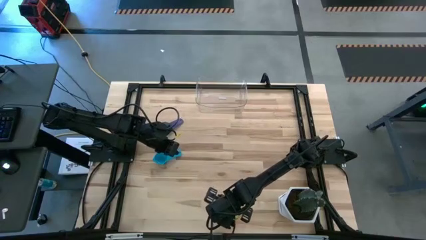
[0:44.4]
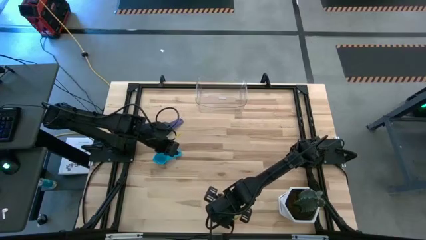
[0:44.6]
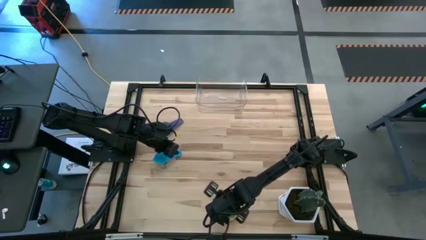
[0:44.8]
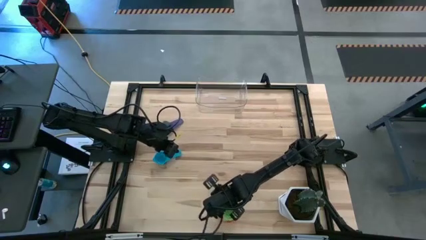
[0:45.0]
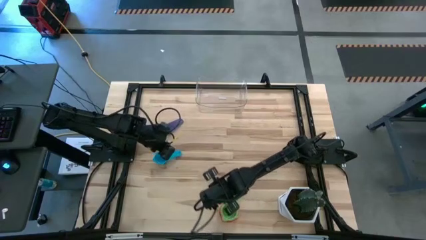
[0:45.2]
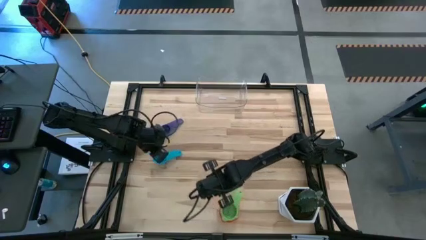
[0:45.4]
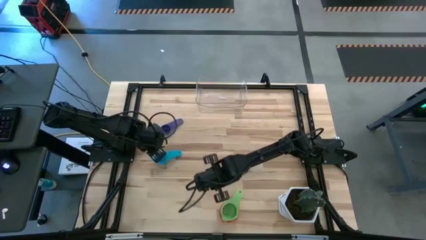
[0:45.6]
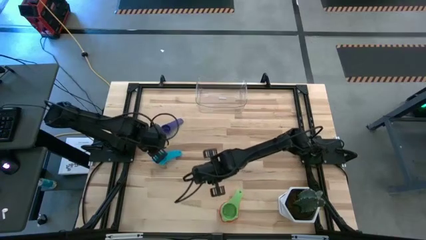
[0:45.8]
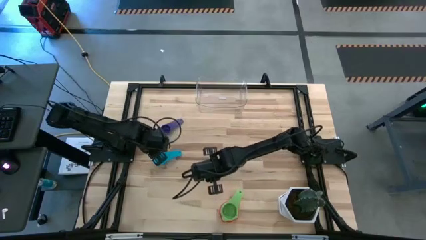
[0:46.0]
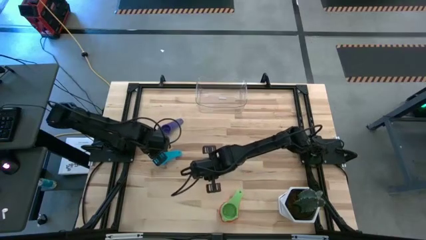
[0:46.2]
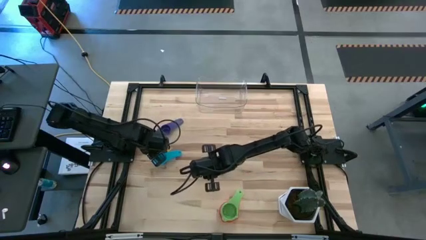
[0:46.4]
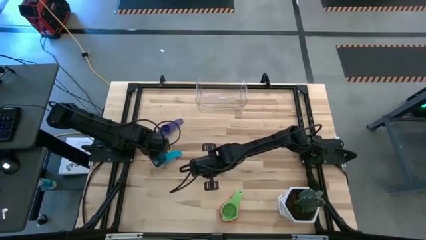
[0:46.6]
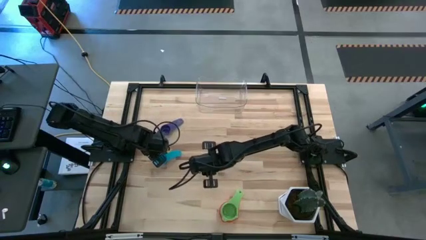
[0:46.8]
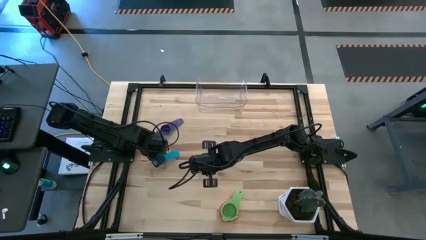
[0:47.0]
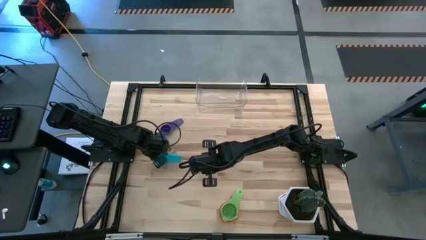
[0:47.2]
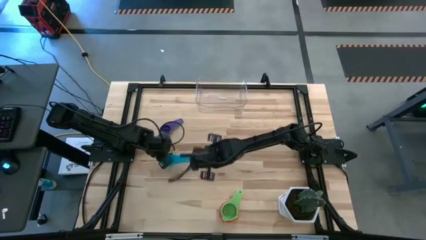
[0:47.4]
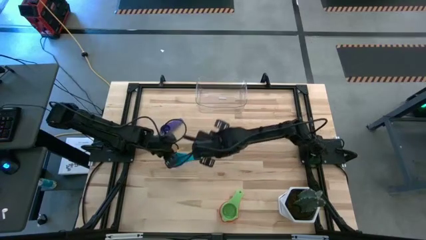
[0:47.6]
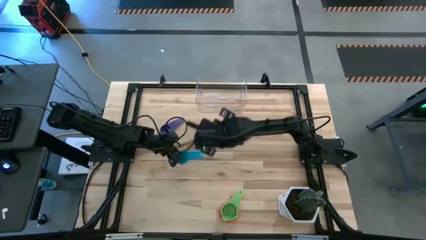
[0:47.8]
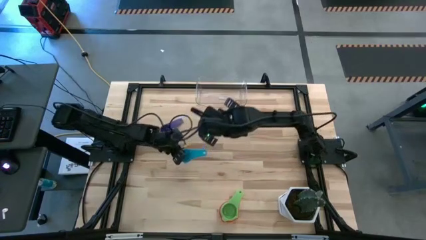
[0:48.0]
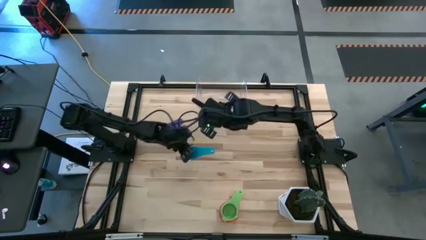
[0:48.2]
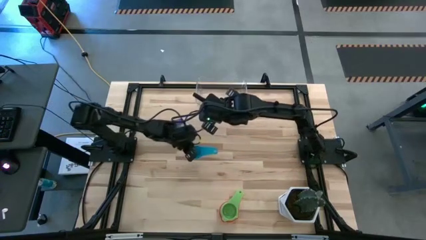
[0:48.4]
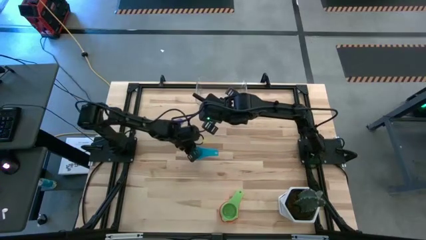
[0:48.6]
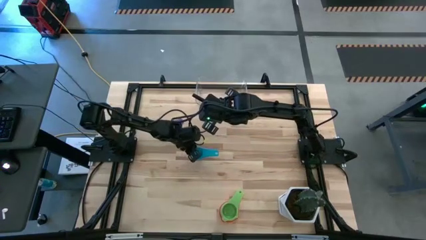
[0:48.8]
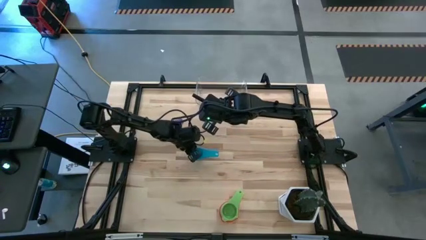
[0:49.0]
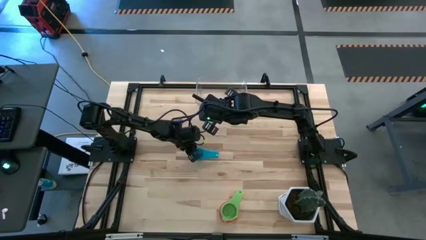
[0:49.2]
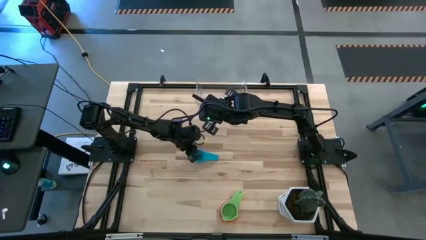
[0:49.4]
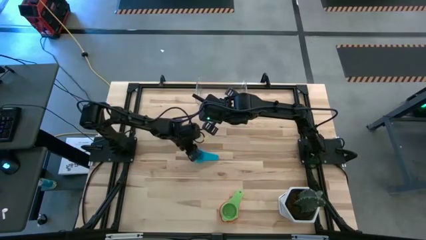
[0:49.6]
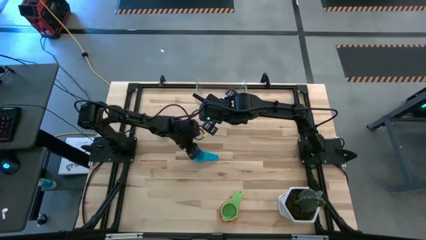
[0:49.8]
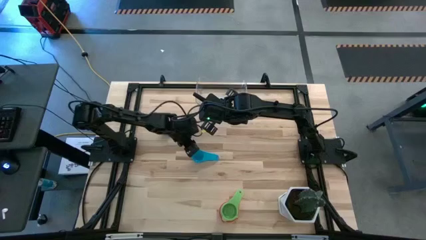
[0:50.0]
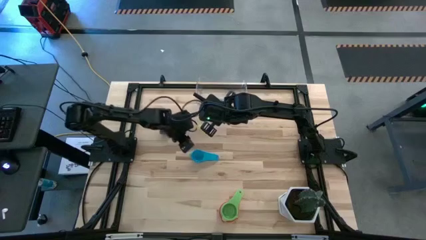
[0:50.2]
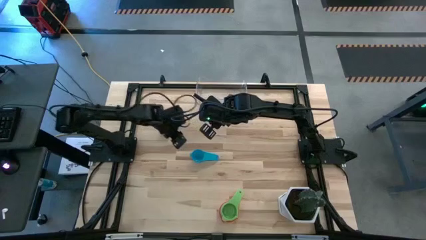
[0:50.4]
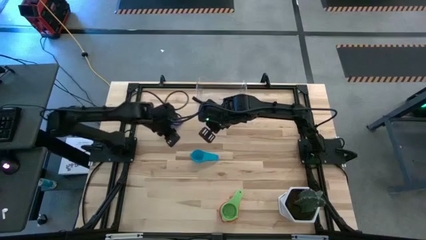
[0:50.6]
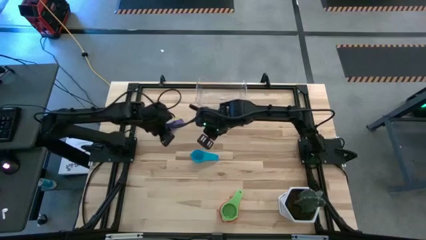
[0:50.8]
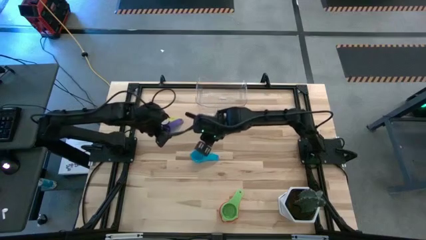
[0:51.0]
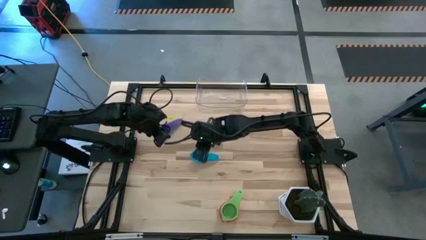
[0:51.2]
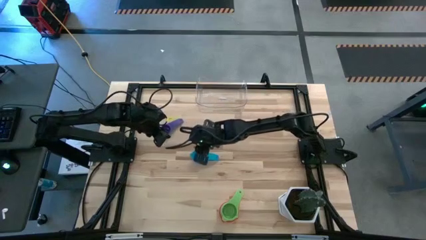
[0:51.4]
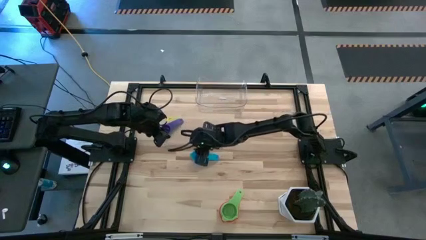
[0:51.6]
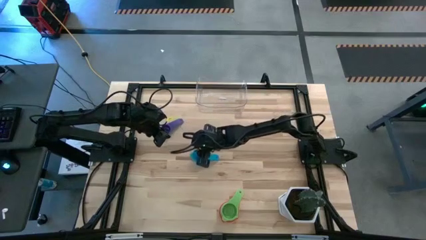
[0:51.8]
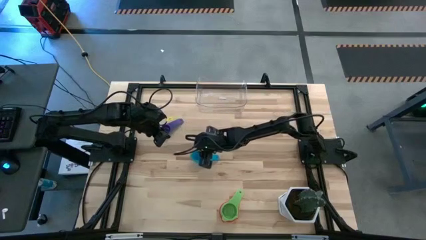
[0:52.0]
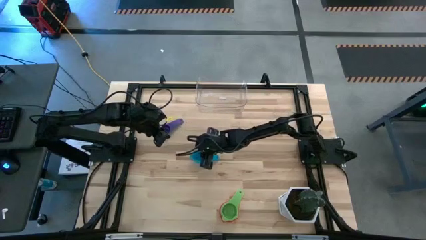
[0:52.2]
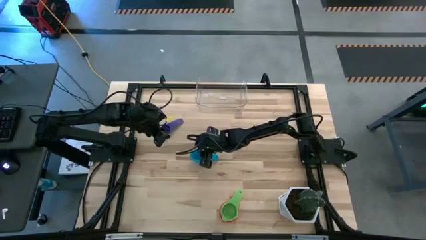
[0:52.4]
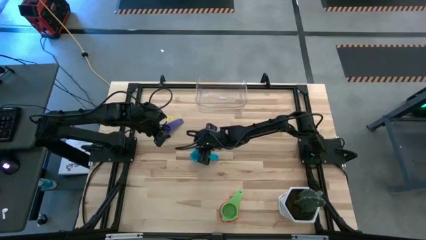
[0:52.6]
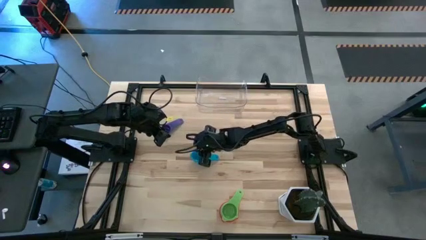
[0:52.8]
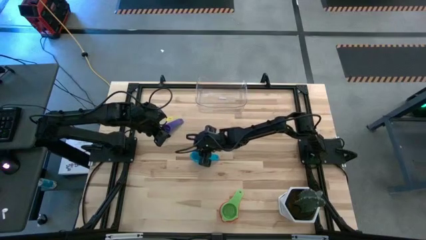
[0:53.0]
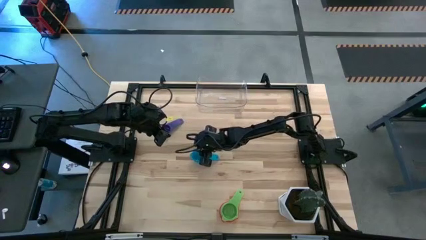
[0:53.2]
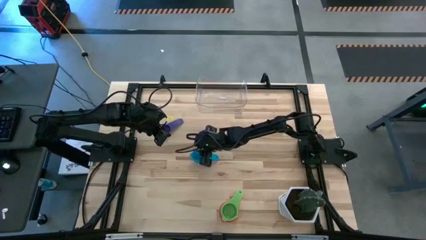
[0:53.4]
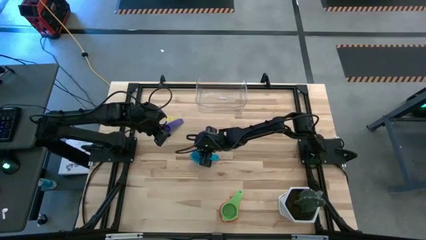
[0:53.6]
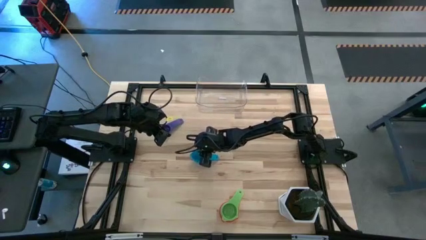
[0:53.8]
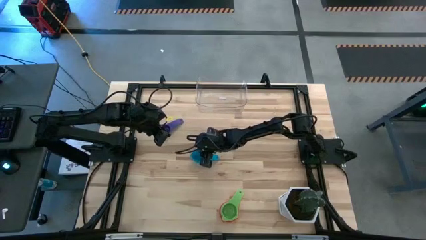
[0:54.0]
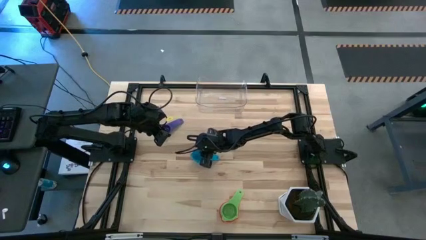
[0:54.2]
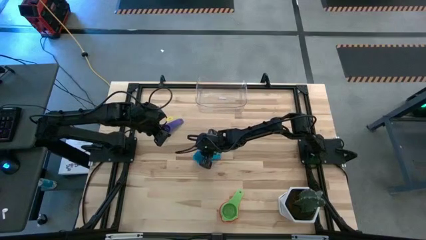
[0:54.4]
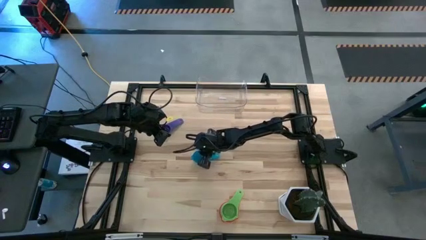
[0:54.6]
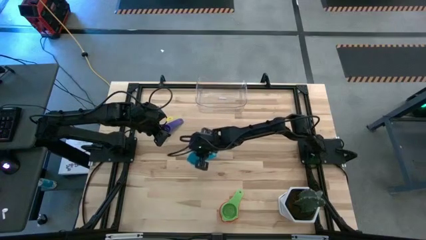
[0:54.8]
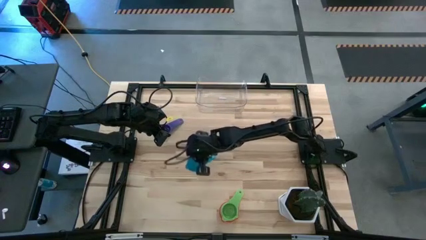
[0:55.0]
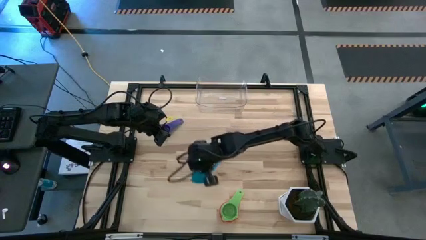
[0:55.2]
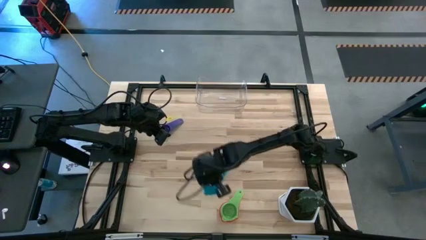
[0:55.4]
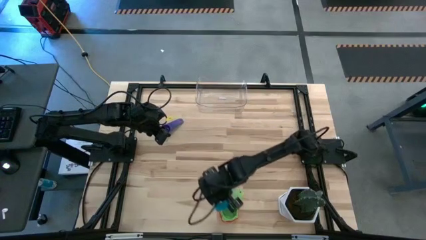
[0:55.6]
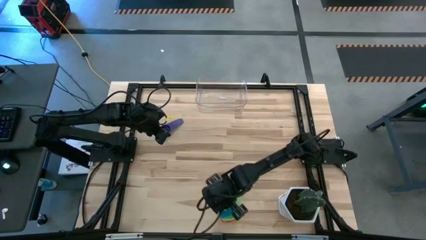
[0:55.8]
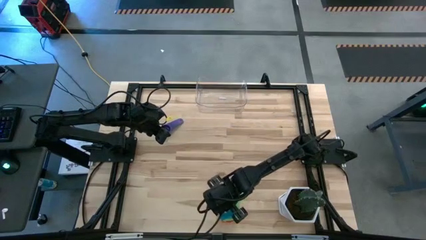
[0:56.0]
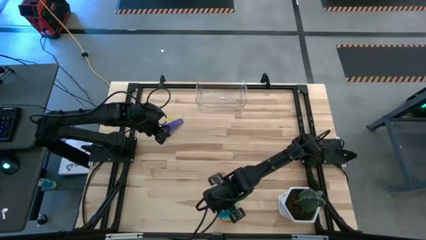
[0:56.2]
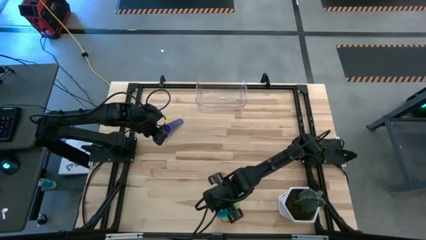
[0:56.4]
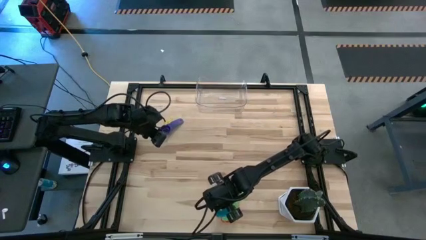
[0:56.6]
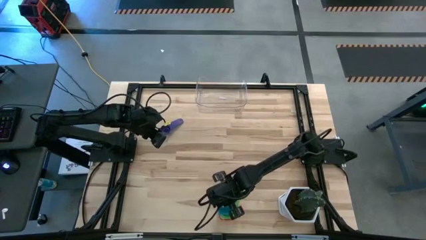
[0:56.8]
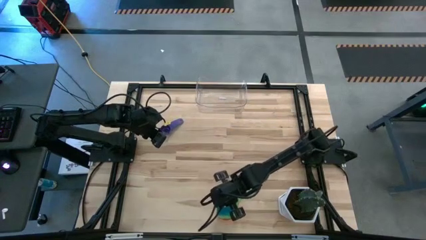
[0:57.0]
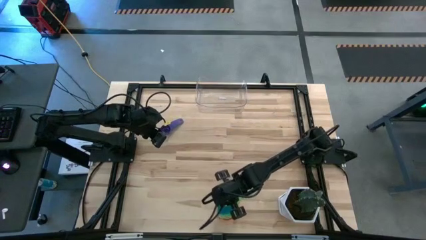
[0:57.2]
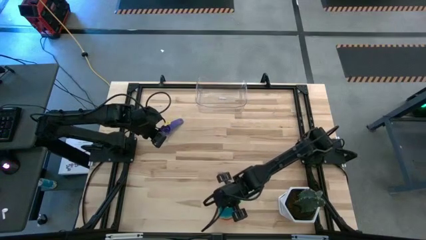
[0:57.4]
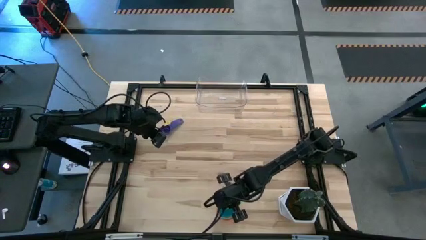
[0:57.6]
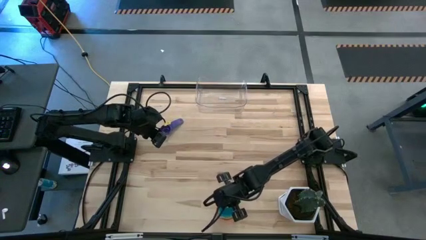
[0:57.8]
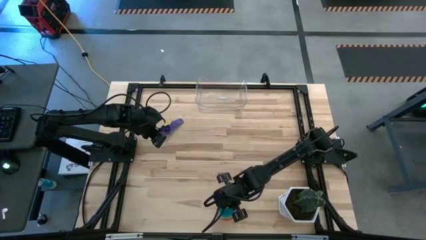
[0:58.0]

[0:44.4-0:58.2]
Task: Nest measuring cups in basket
Stack the light blue measuring cup on the green measuring cup

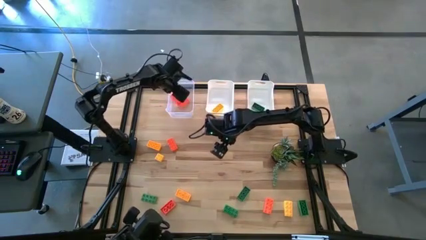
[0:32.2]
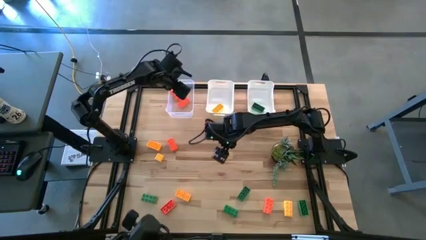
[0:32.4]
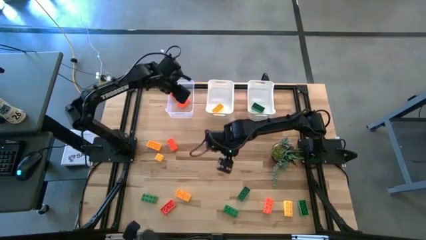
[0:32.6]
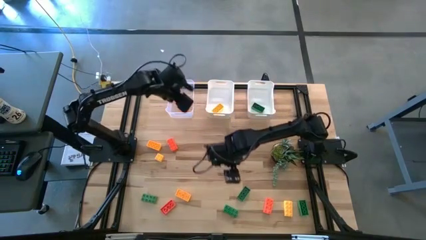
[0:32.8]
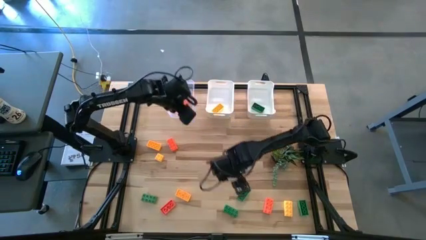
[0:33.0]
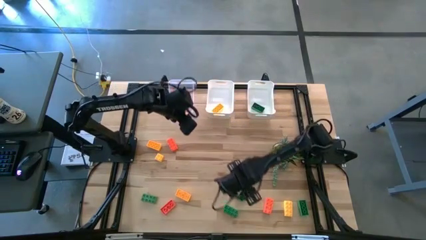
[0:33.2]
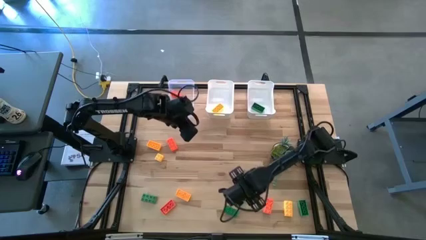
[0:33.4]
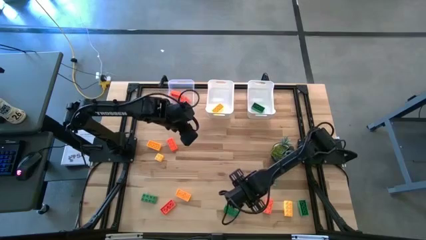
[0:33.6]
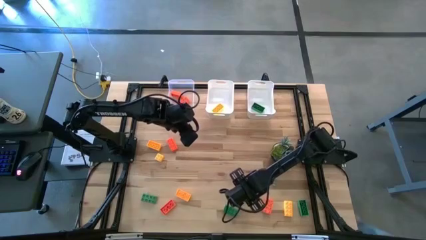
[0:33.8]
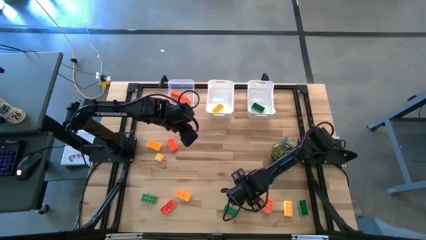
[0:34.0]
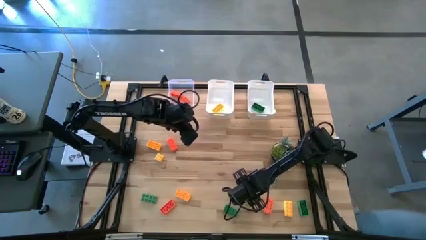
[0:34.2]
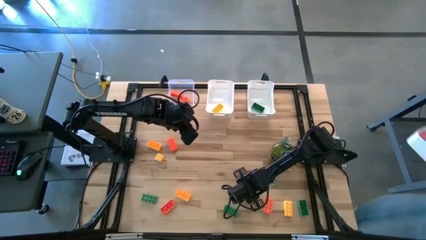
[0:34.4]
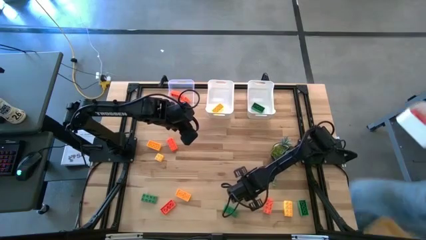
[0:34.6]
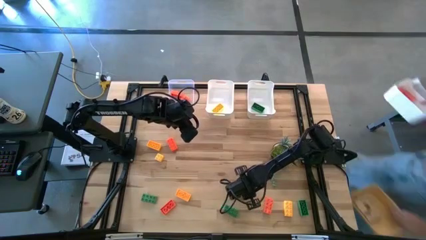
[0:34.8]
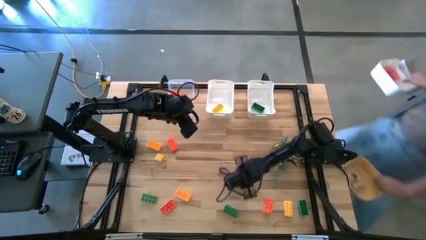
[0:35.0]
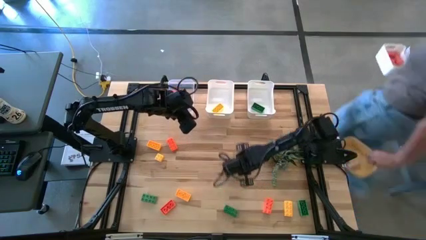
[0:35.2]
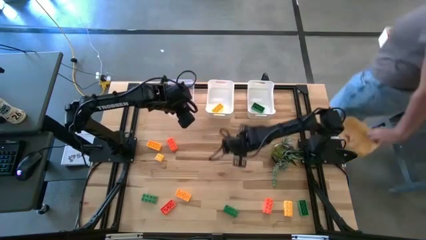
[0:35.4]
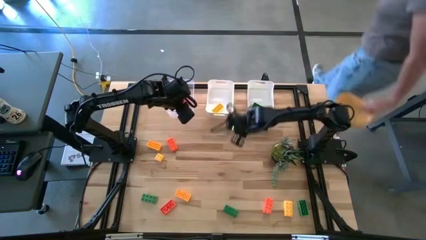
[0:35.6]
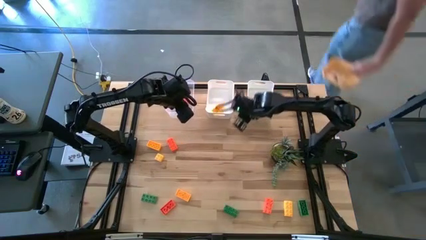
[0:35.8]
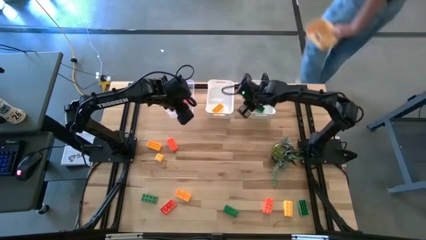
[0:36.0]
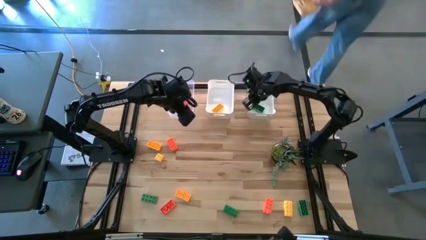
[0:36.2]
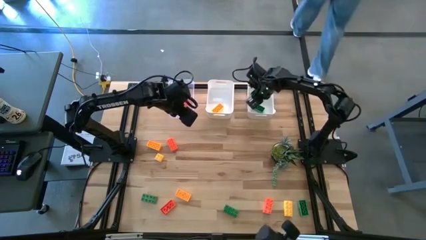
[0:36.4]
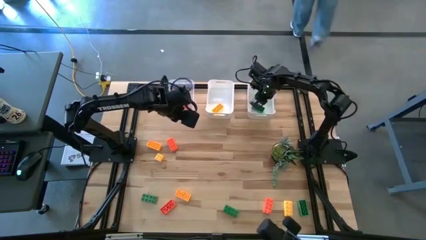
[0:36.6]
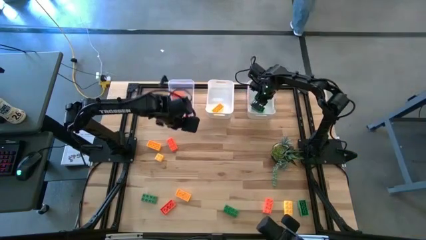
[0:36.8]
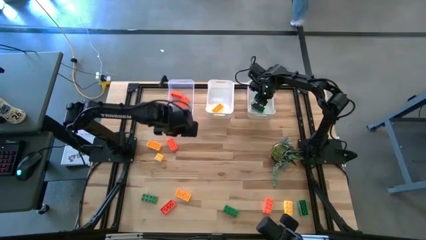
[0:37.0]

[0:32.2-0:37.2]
Task: Sort & place blocks by color
Put the green game piece into the right white bin
